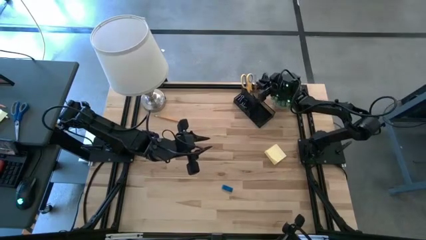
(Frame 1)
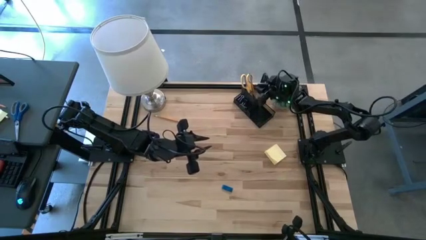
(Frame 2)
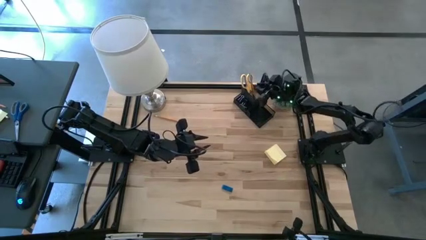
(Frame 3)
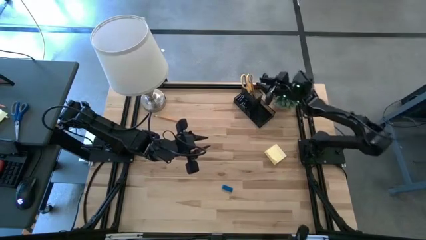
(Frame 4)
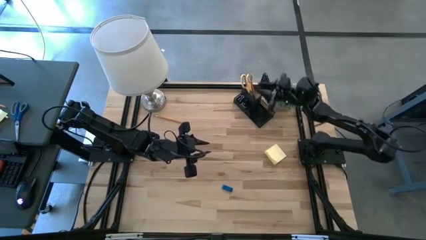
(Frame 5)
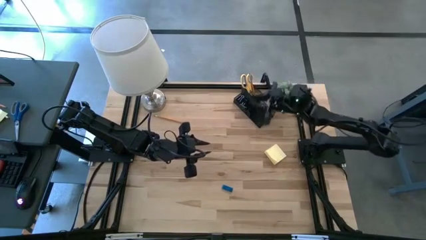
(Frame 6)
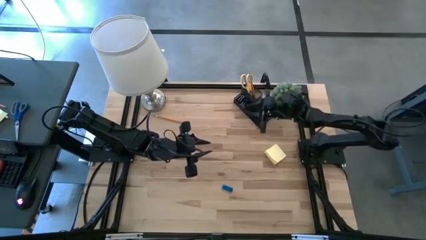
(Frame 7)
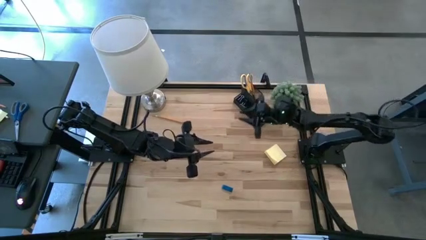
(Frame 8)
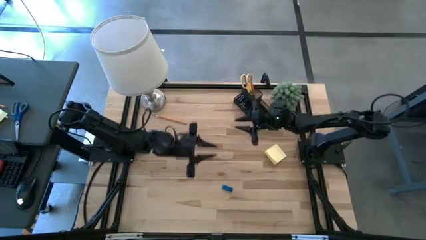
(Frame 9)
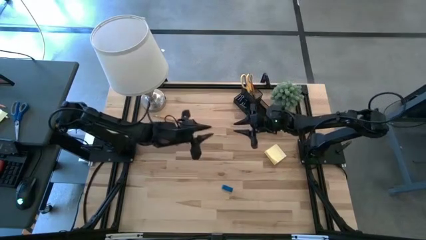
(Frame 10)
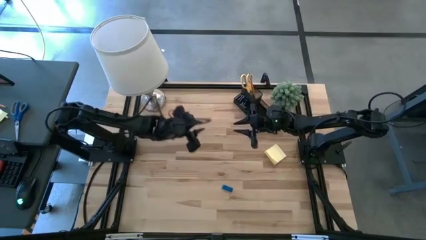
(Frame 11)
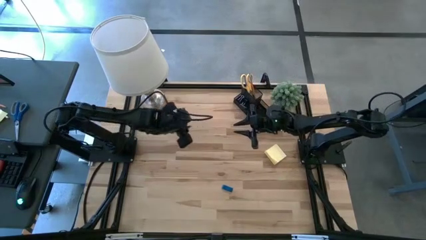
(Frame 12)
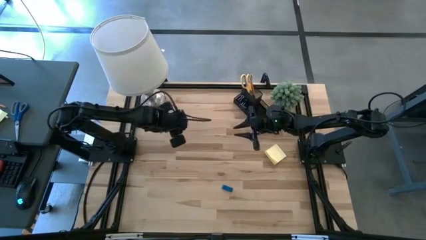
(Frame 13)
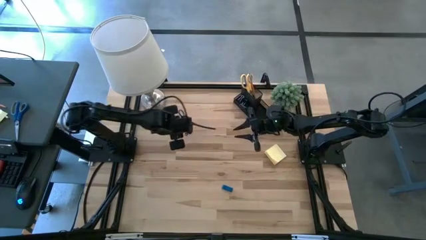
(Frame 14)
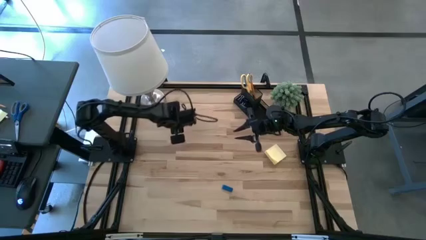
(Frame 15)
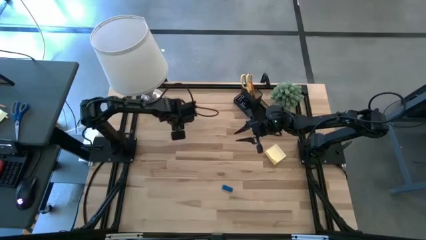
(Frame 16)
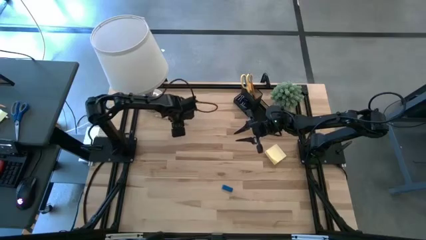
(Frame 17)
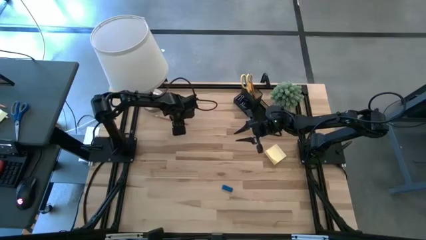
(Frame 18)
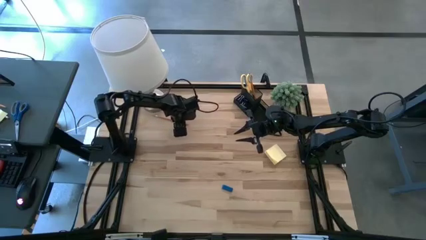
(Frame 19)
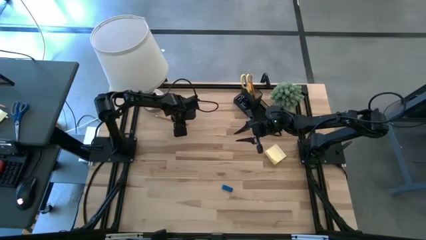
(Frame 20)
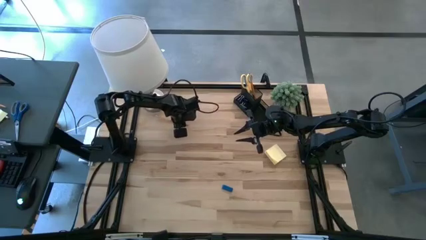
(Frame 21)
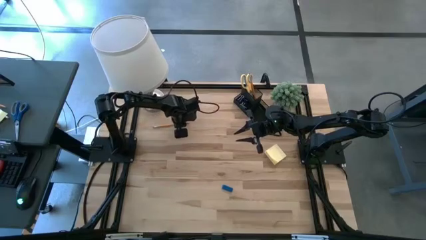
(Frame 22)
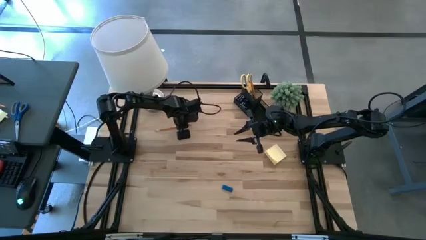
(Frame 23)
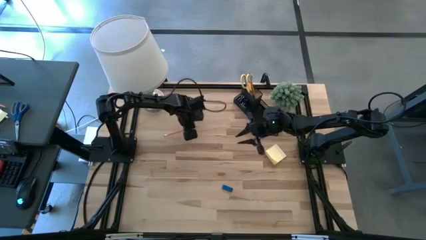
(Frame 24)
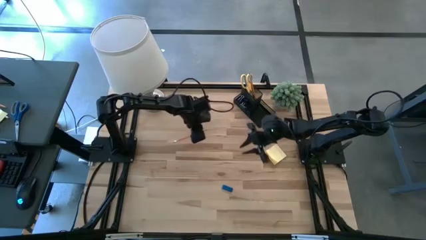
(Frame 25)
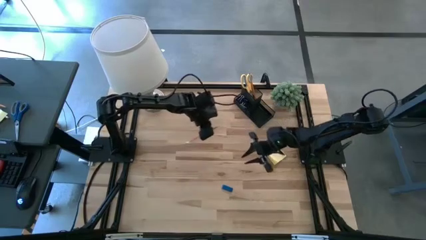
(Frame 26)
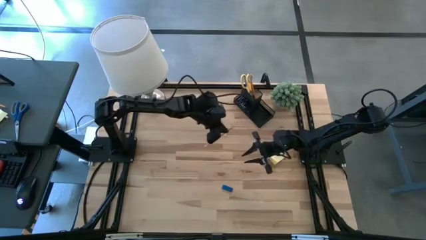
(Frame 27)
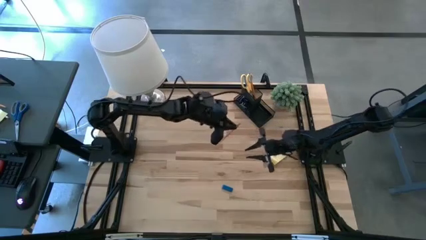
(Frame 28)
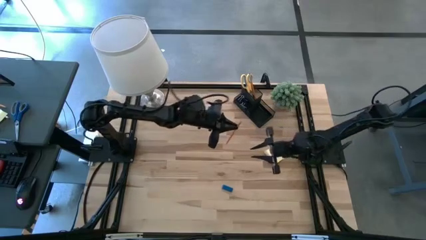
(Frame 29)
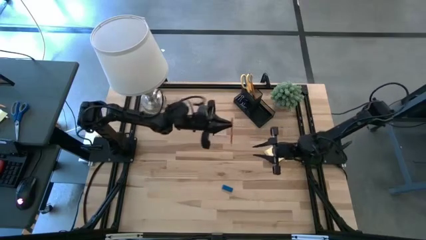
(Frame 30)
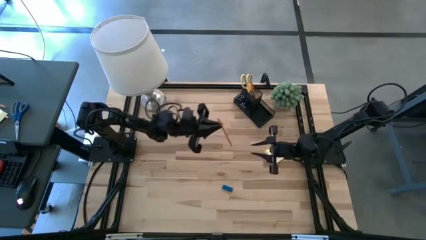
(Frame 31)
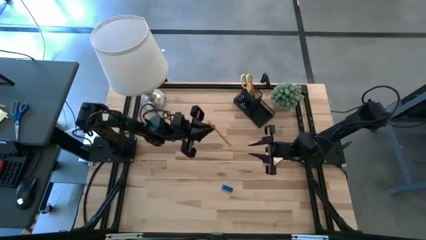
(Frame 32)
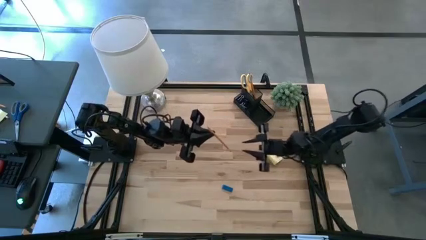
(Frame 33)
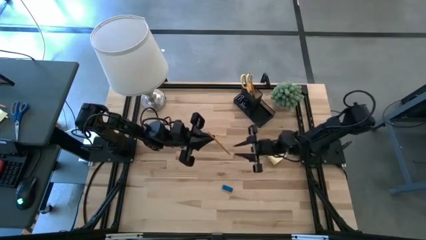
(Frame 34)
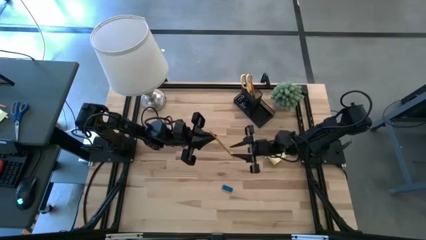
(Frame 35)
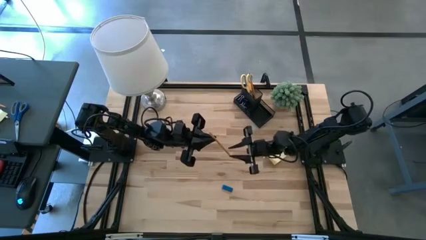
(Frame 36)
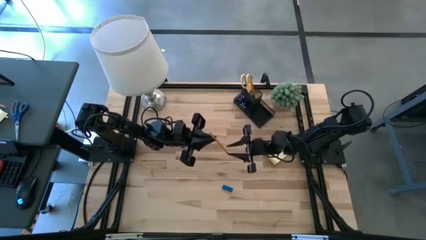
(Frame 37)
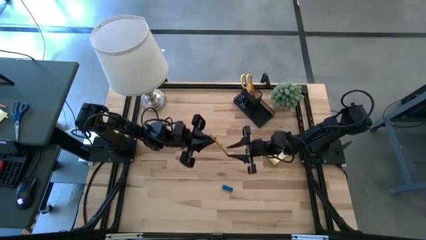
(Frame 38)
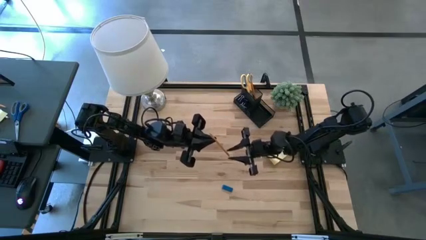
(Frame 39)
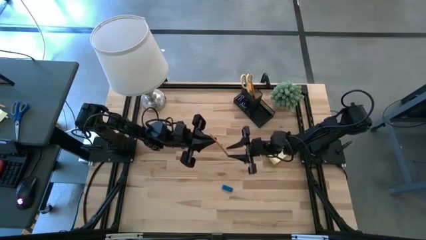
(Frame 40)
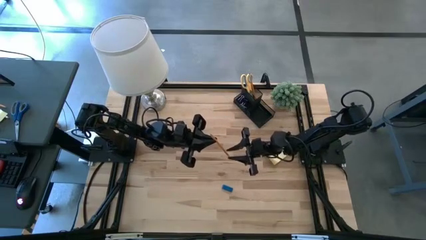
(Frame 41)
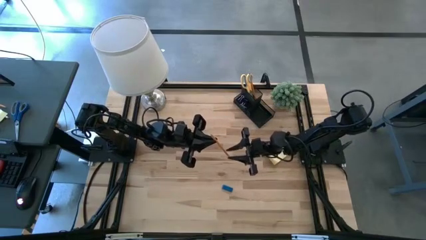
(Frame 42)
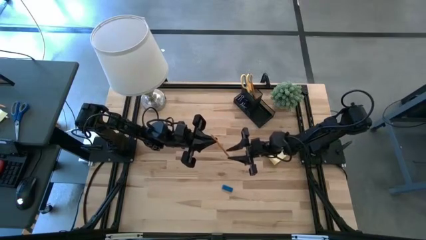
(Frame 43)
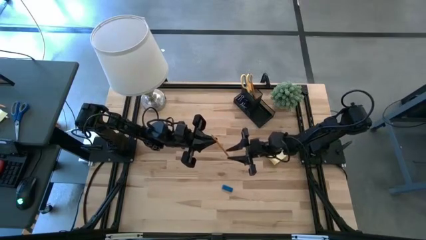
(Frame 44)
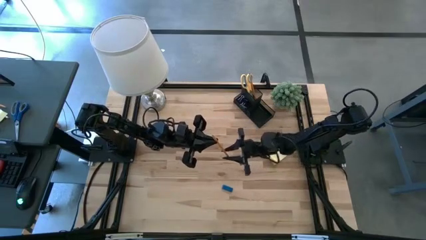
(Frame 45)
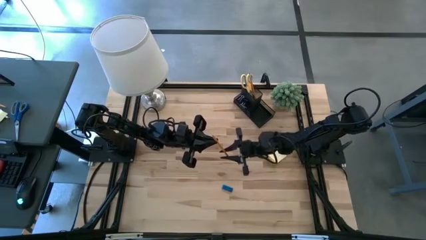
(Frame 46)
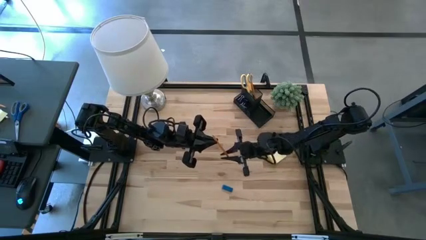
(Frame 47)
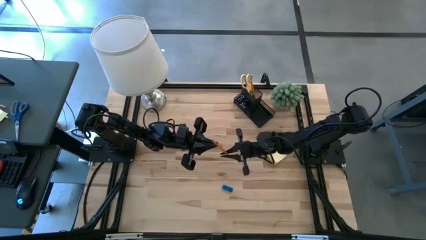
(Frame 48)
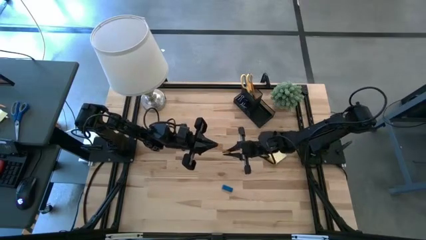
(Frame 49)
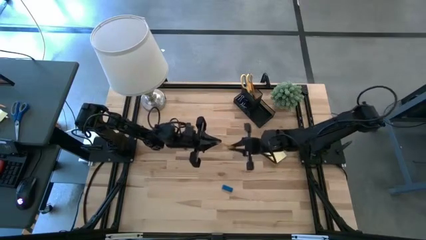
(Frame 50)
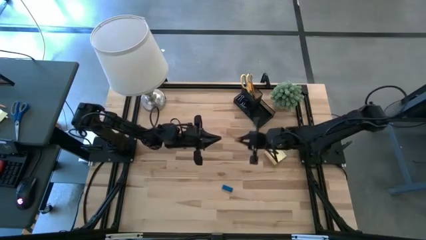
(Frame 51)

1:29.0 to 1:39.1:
Task: Pick and place office supplies into organizer
Put the orange pencil into the desk organizer
